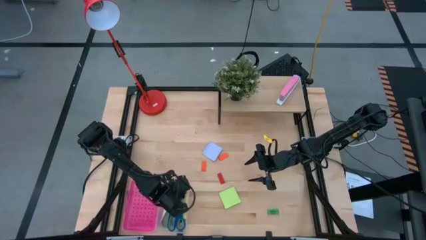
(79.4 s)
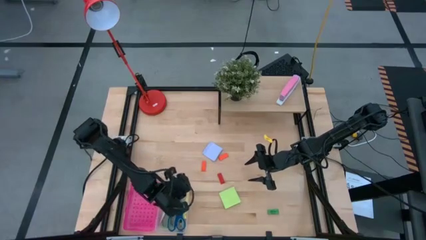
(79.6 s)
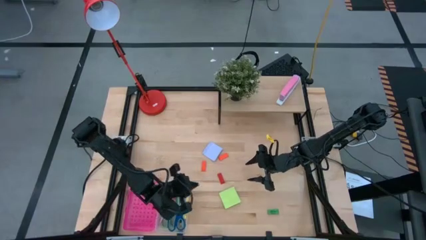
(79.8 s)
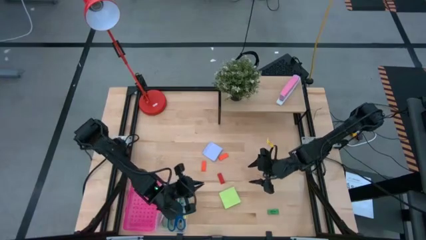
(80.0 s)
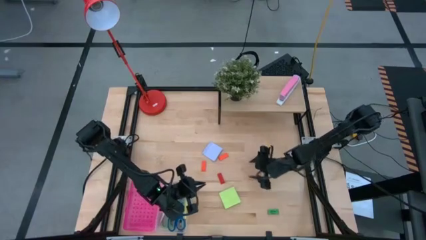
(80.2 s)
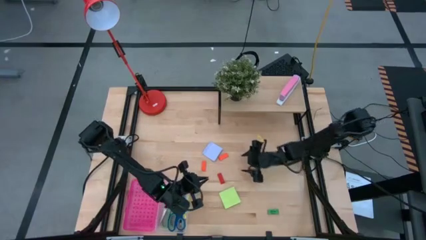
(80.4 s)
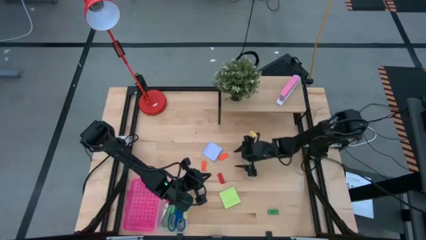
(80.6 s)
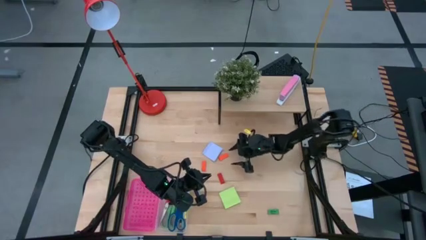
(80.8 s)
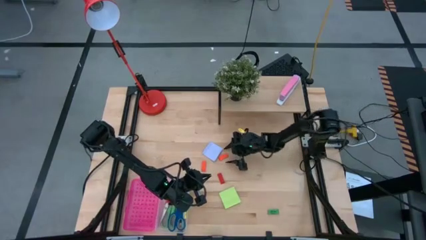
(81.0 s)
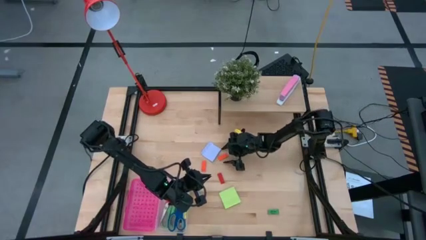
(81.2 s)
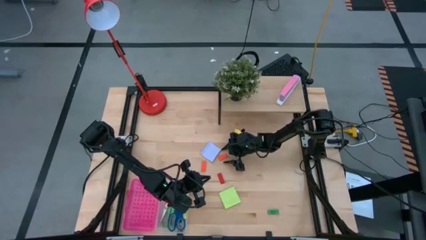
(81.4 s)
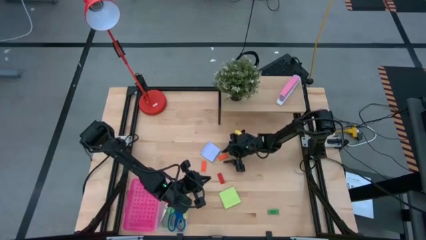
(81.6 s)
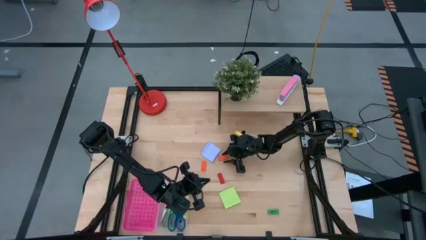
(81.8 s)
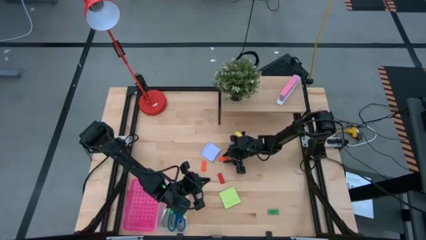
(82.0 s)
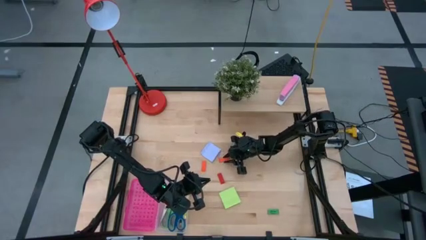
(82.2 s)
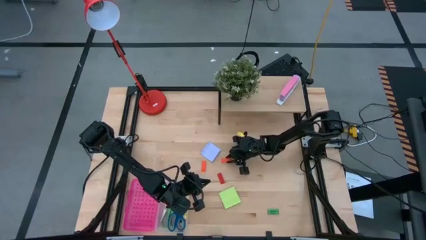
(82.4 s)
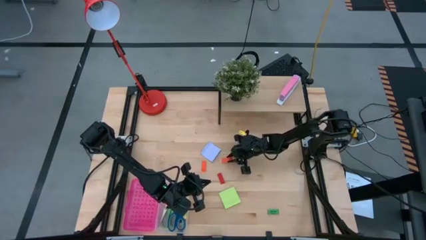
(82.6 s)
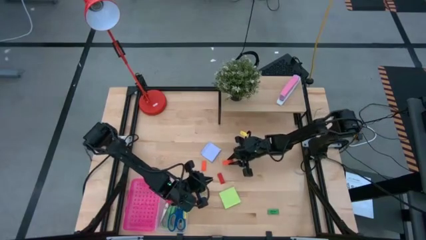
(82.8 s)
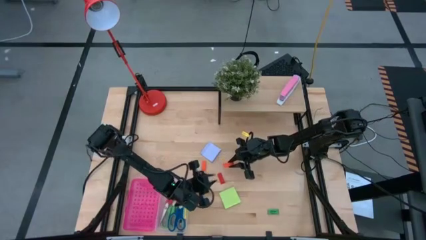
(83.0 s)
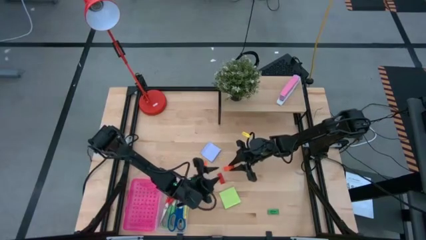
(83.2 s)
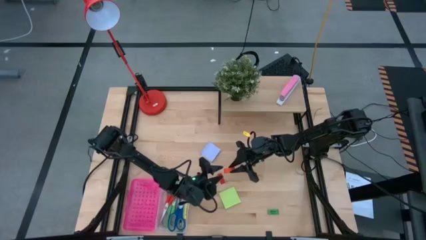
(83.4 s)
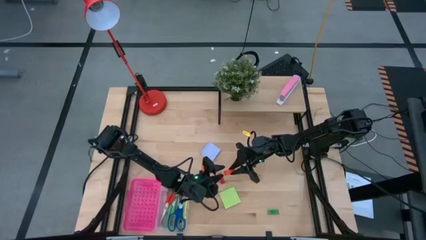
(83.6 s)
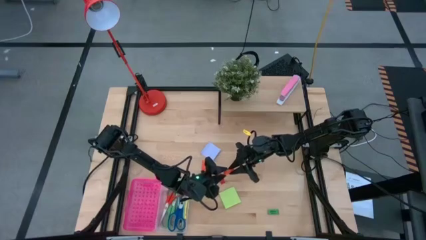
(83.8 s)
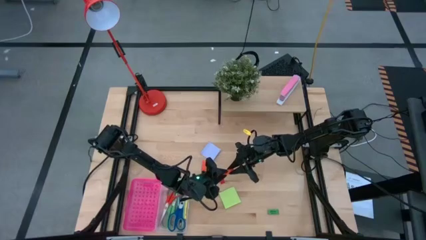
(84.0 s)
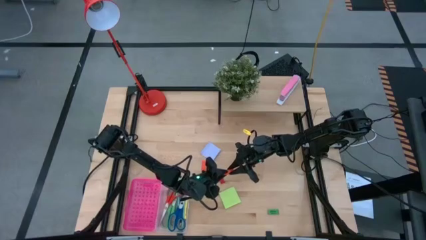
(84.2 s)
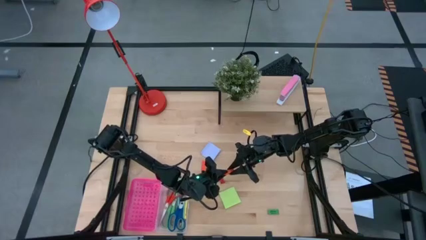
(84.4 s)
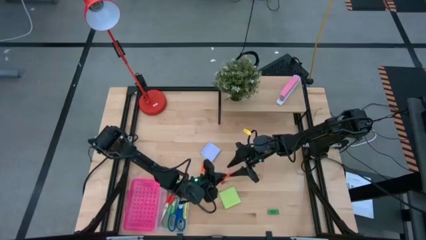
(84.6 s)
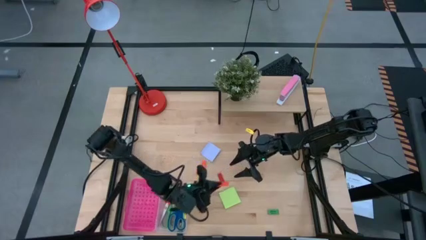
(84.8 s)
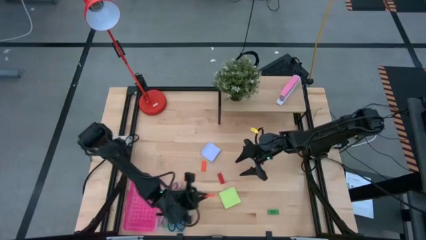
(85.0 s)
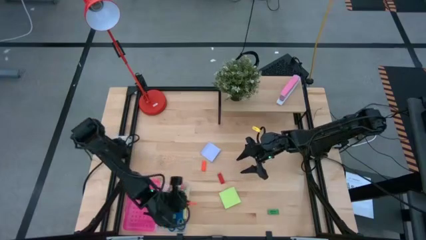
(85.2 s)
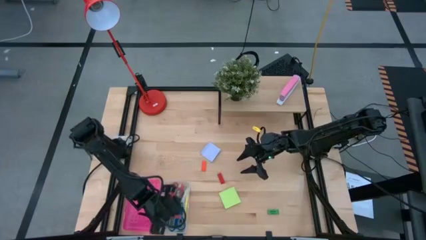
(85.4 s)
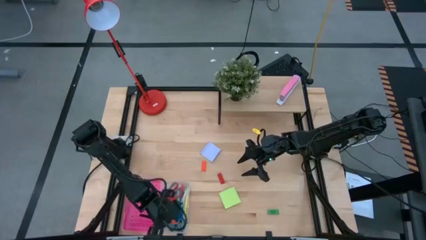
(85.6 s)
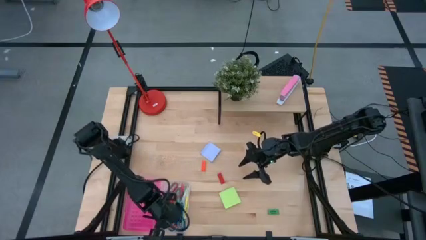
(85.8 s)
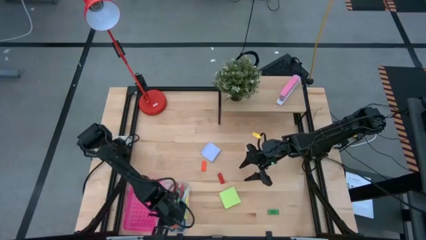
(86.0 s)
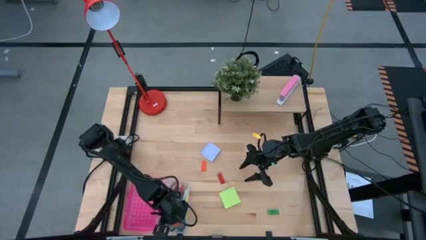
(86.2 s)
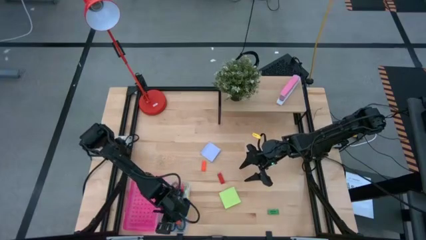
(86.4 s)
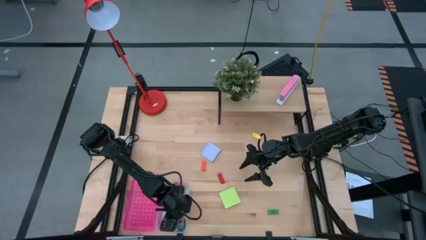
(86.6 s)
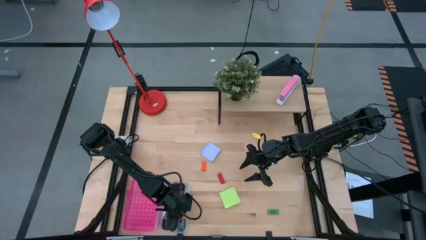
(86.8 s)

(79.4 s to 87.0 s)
Task: Pack school essentials
Put the right orange eraser into the pink supply box

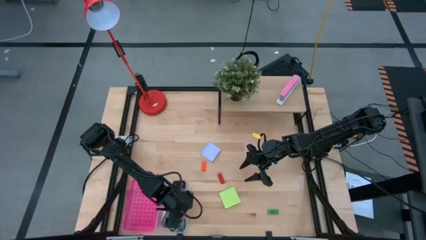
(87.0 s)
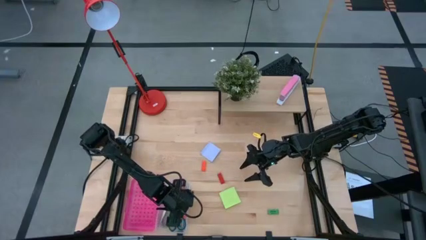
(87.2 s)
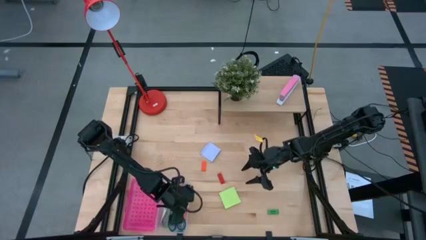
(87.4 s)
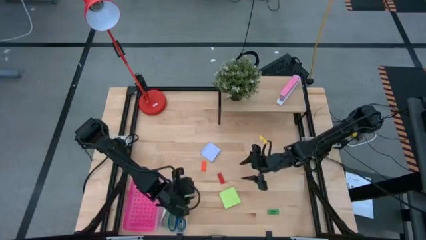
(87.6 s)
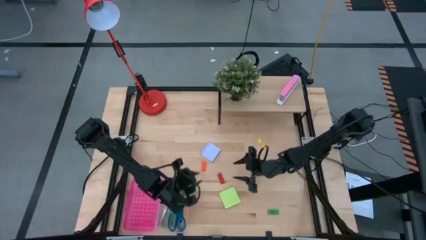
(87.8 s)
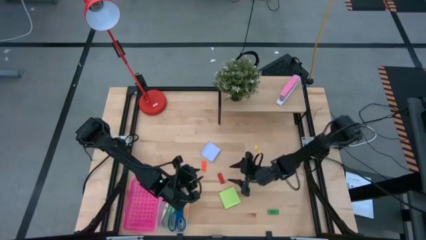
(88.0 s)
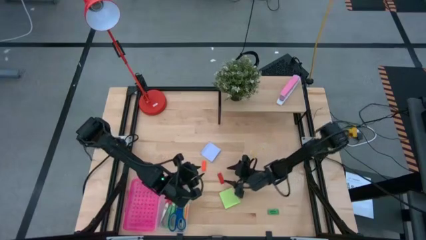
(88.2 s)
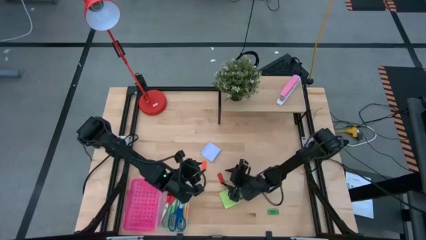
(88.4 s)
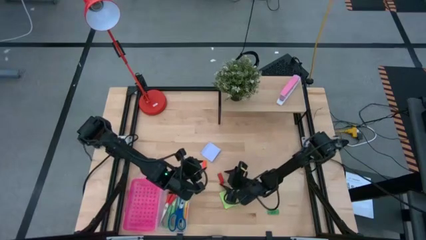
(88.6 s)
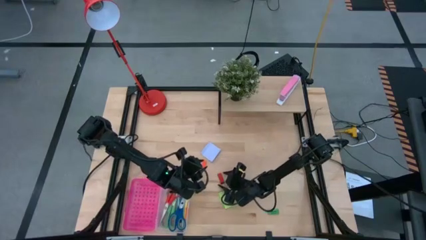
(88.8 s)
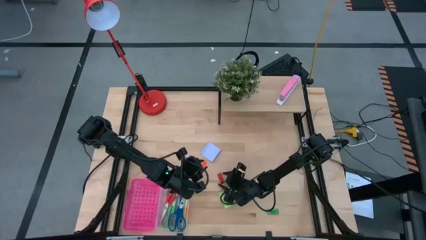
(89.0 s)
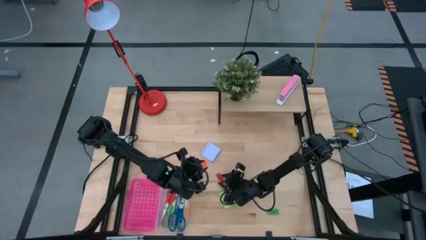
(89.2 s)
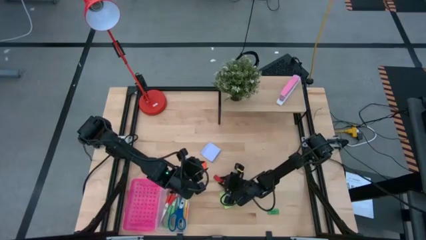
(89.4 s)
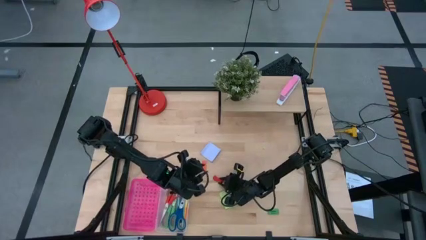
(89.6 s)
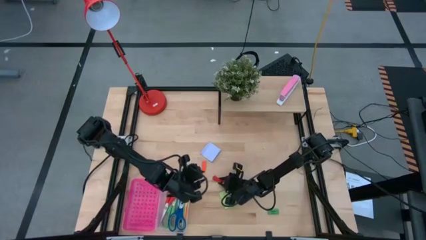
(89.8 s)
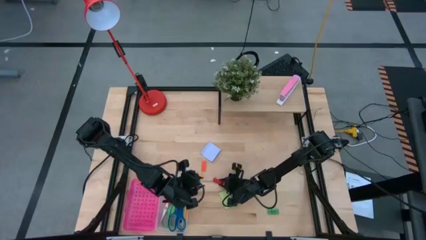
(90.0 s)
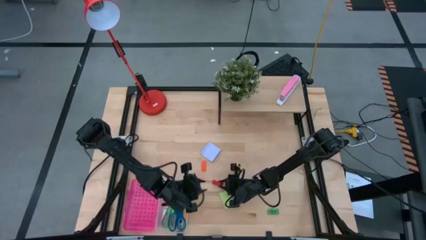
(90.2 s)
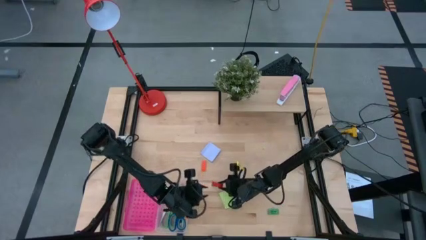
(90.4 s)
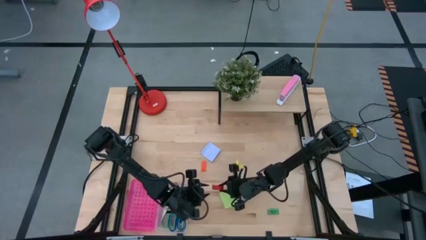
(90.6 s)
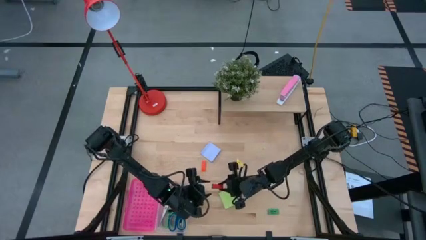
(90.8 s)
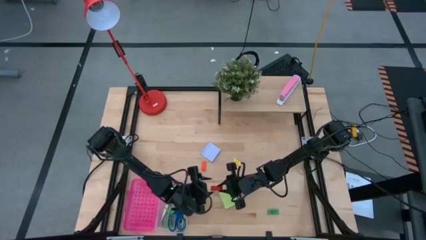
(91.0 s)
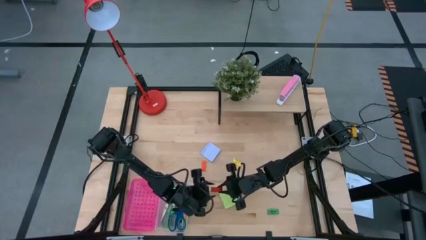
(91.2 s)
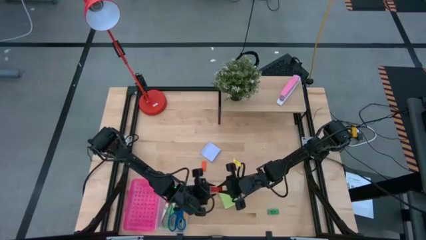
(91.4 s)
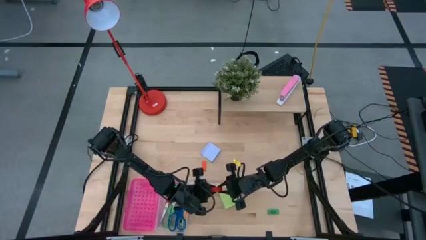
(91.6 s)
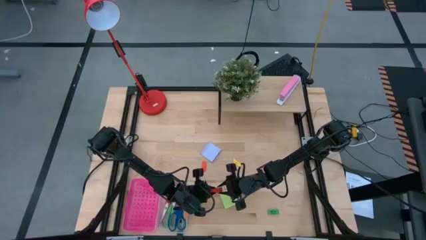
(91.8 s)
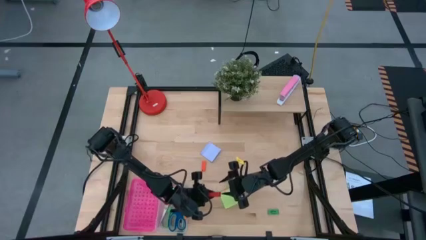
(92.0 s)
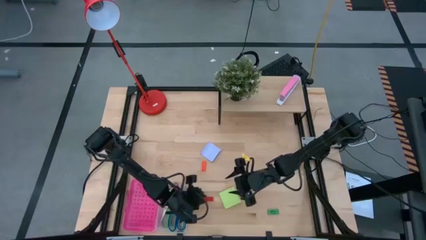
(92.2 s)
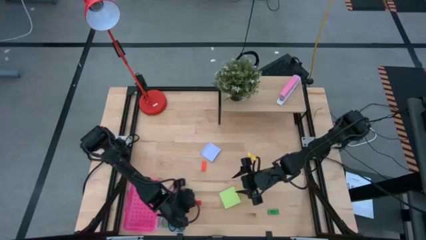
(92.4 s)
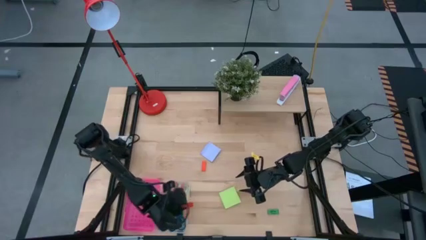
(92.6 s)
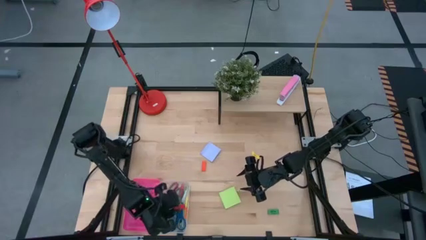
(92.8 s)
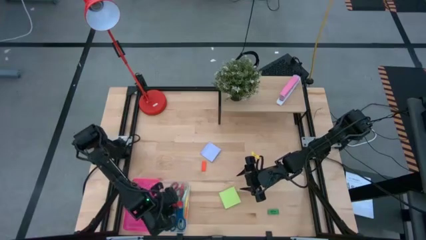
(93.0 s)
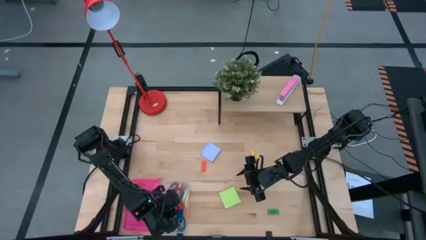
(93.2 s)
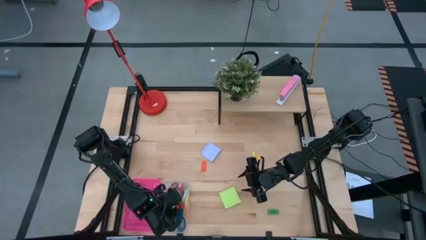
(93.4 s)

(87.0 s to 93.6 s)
Put the red eraser into the pink supply box

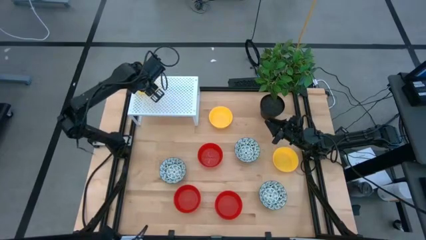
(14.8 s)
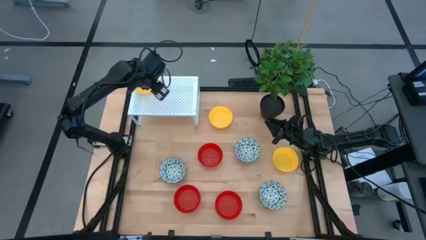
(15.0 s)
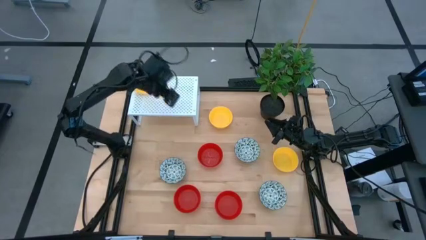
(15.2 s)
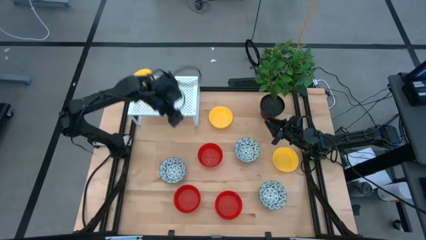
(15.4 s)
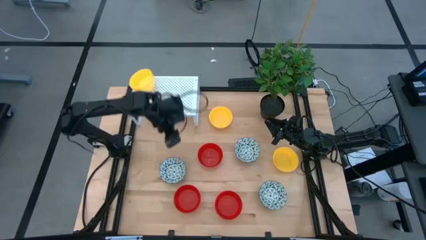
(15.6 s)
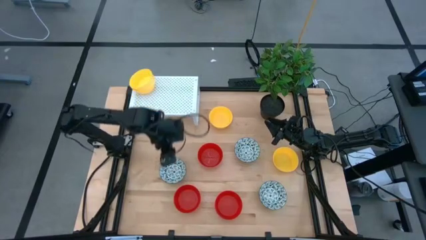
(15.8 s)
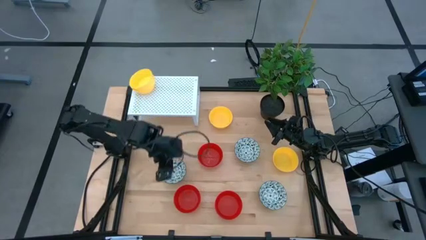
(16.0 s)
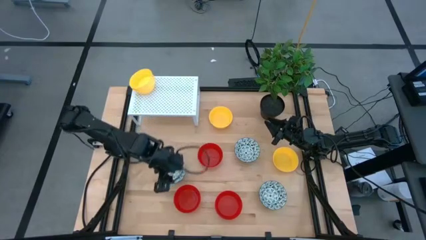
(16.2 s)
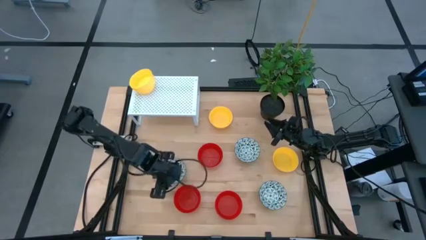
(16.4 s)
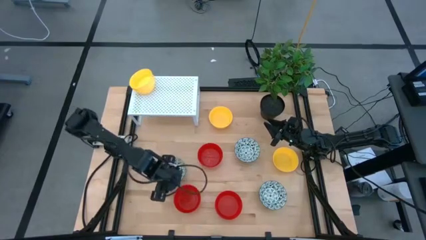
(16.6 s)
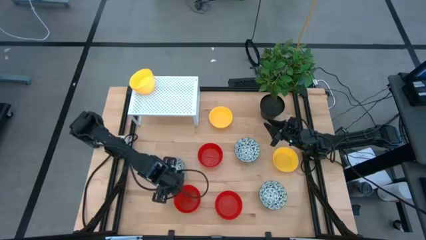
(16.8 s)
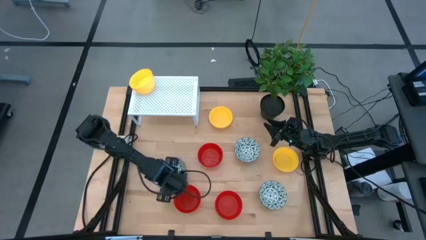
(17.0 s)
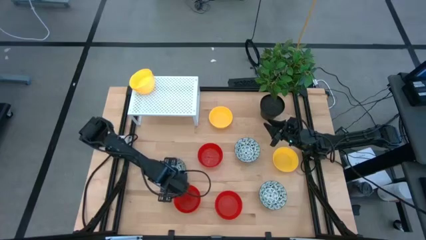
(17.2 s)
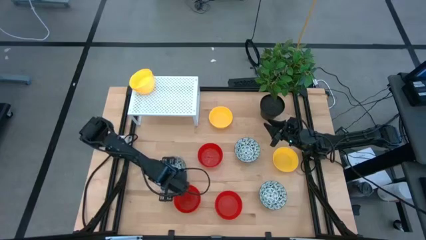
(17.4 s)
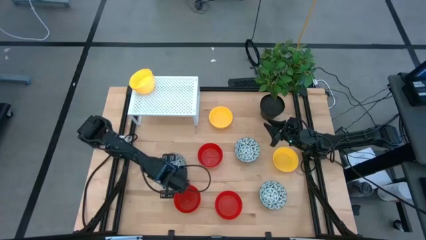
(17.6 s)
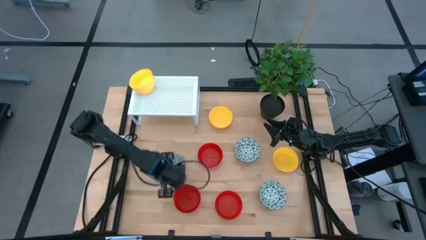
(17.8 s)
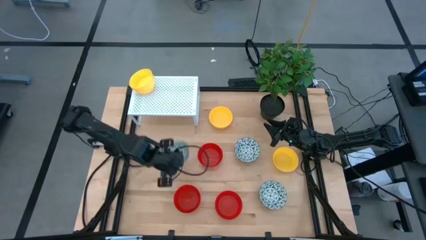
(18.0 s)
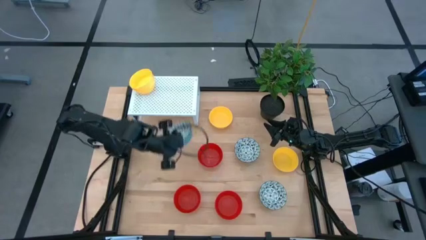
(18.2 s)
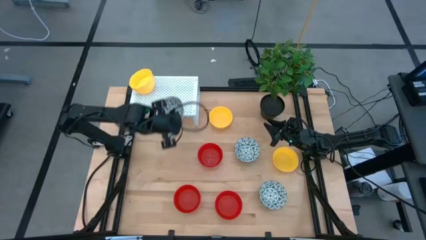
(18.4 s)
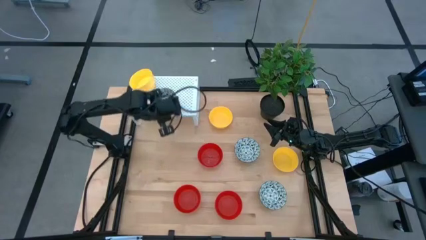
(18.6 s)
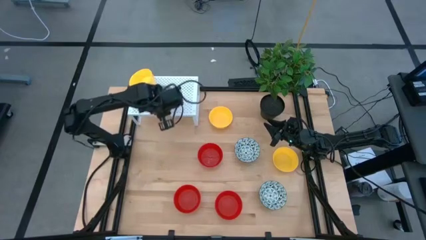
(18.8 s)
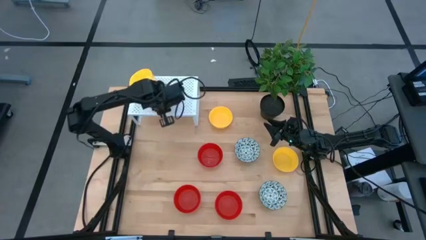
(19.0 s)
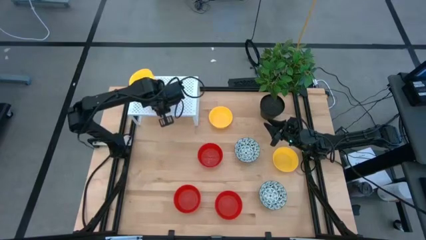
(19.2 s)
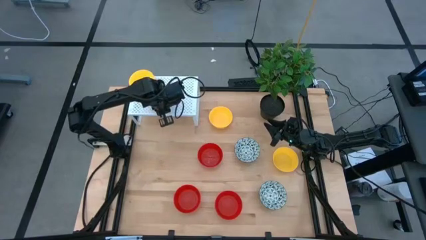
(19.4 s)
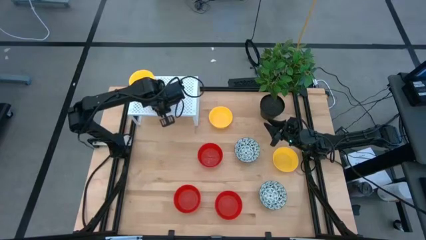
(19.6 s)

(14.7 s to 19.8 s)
Task: Pick & Place Mini bowls
Put the green patterned bowl on the shelf
